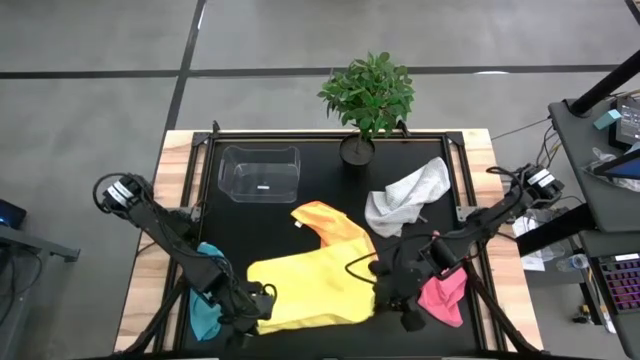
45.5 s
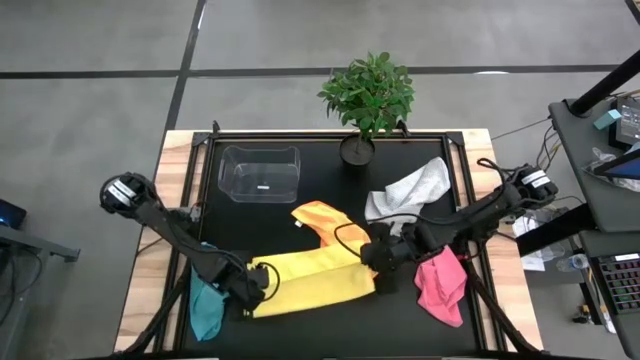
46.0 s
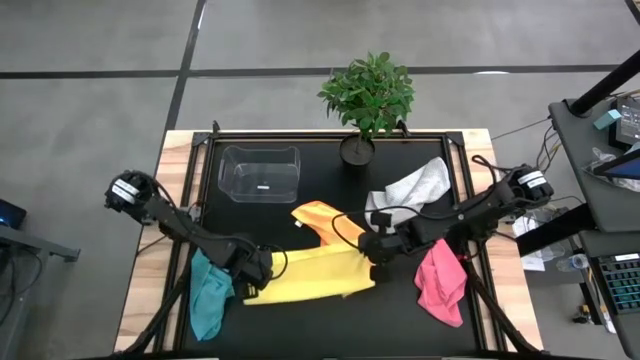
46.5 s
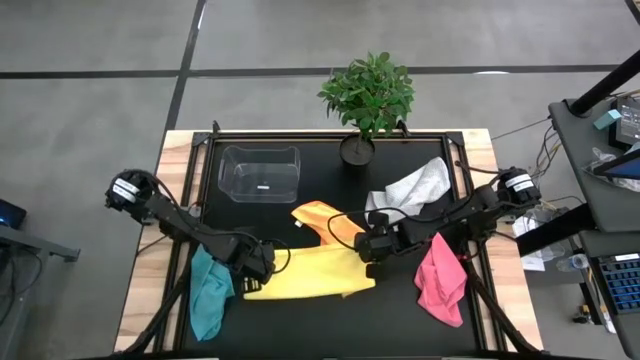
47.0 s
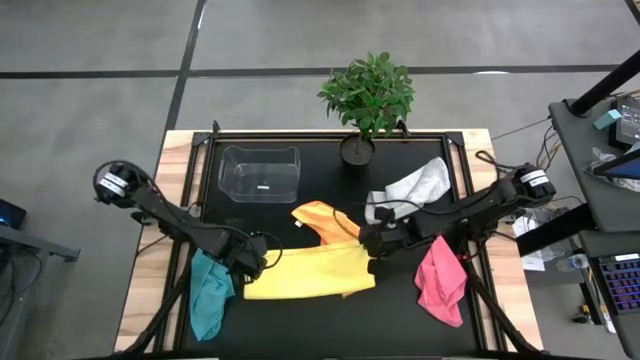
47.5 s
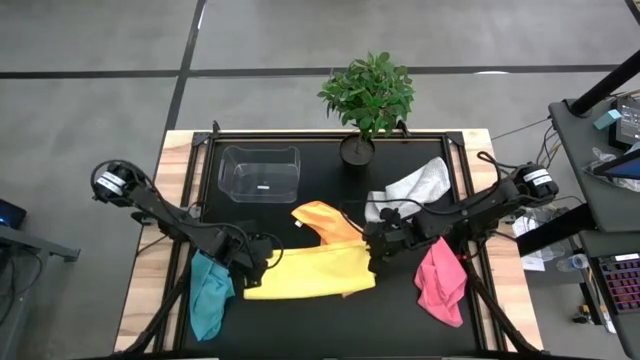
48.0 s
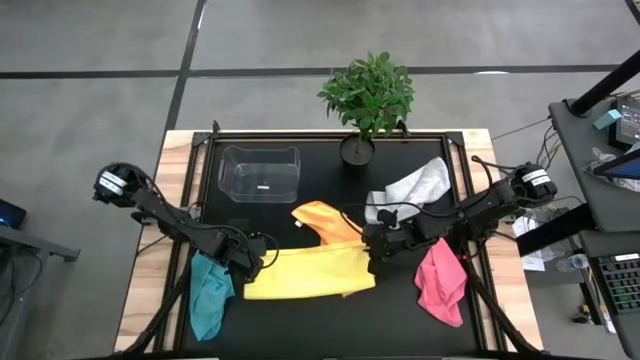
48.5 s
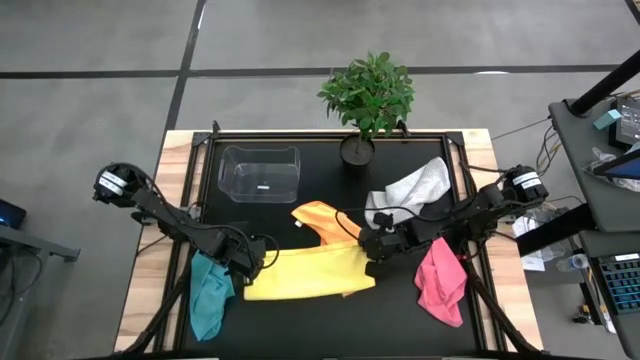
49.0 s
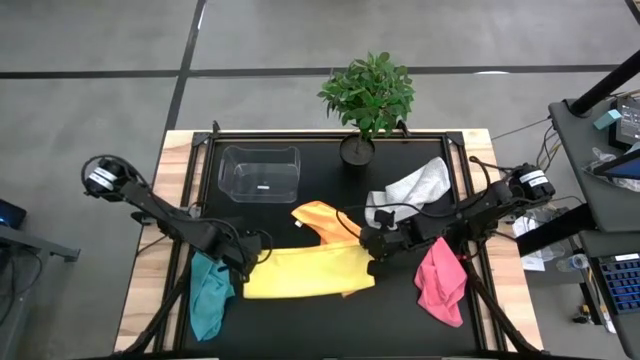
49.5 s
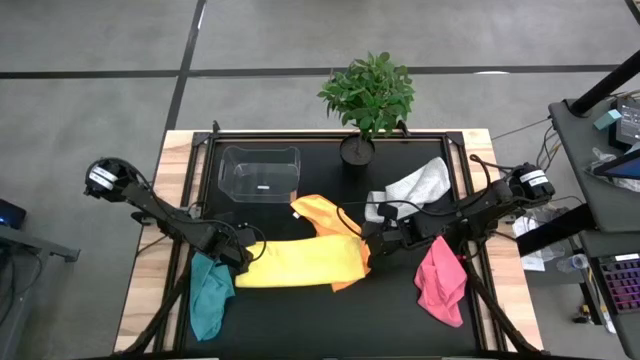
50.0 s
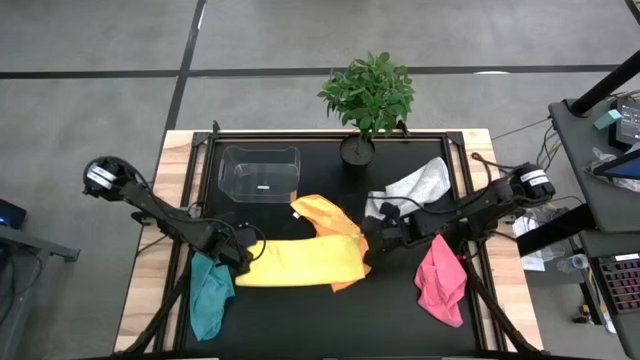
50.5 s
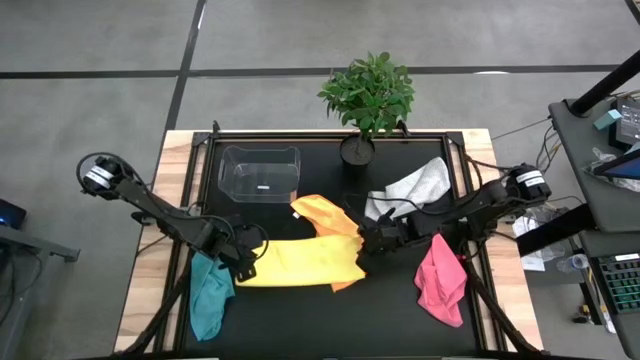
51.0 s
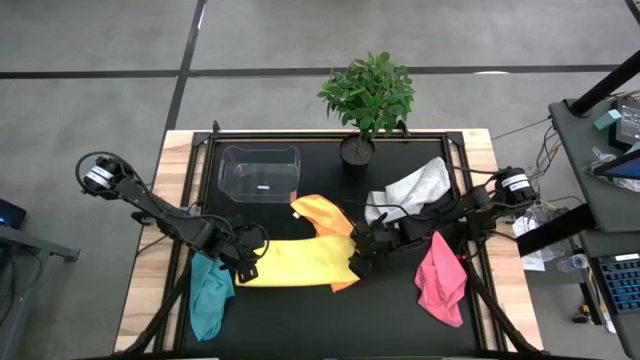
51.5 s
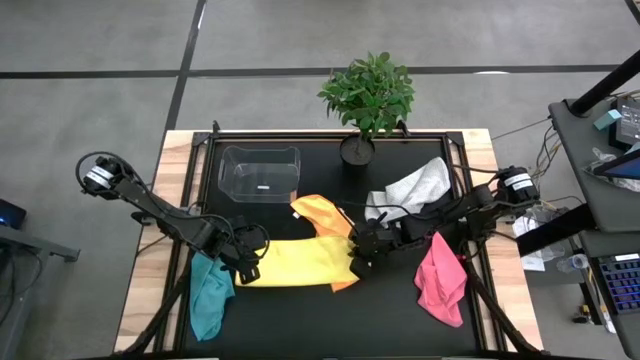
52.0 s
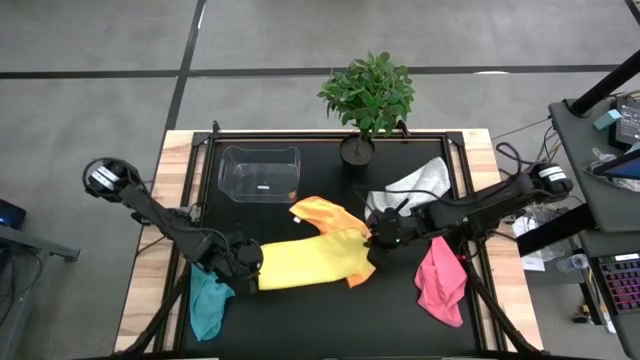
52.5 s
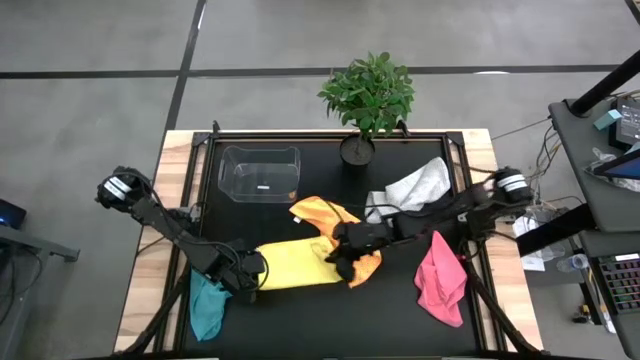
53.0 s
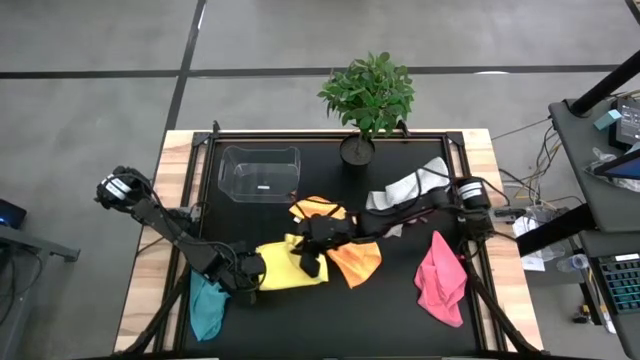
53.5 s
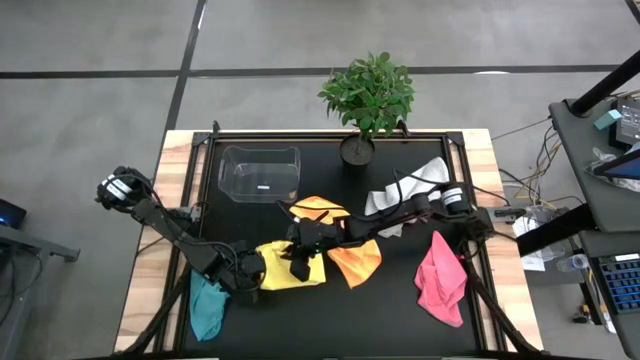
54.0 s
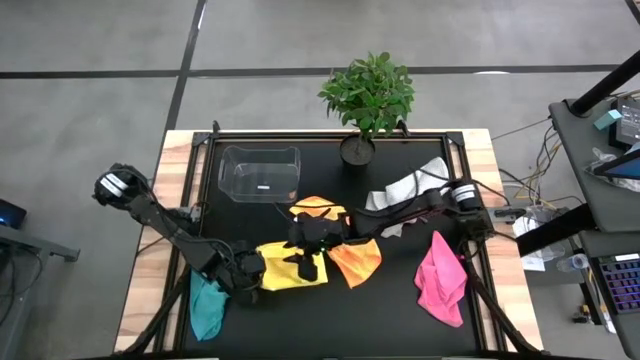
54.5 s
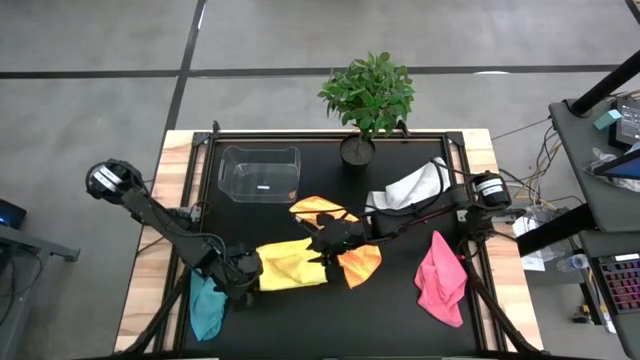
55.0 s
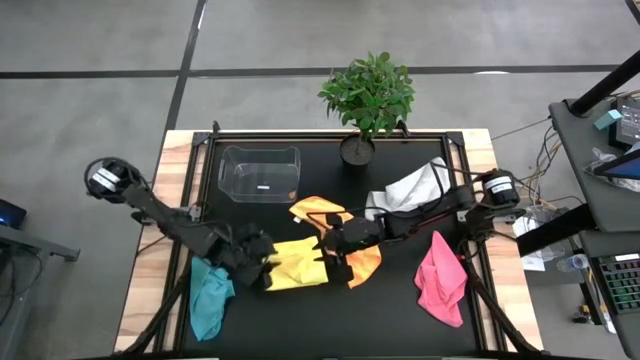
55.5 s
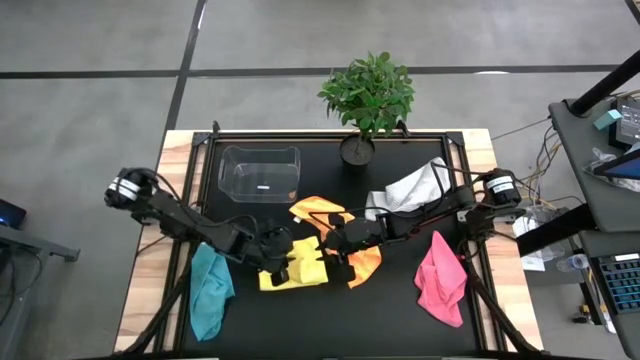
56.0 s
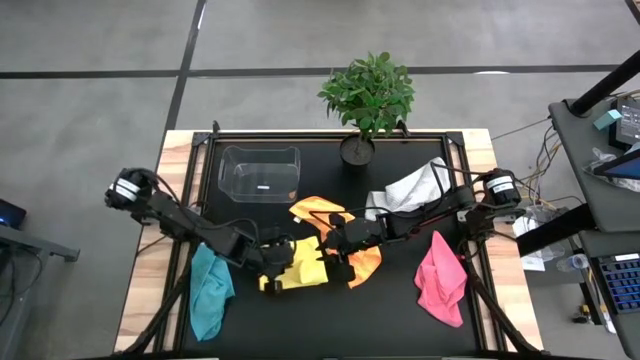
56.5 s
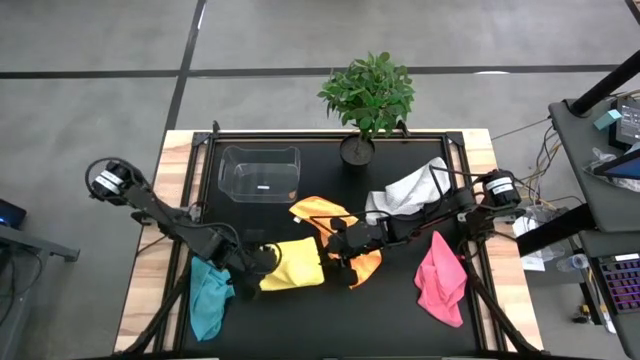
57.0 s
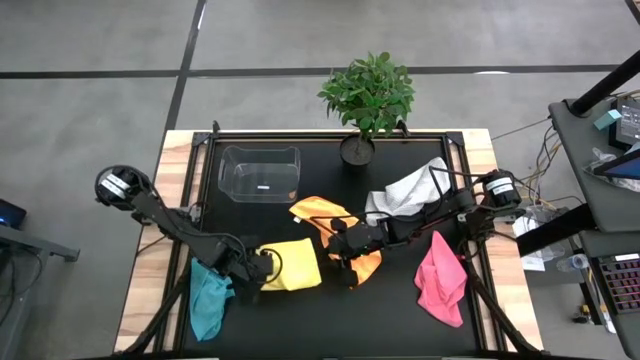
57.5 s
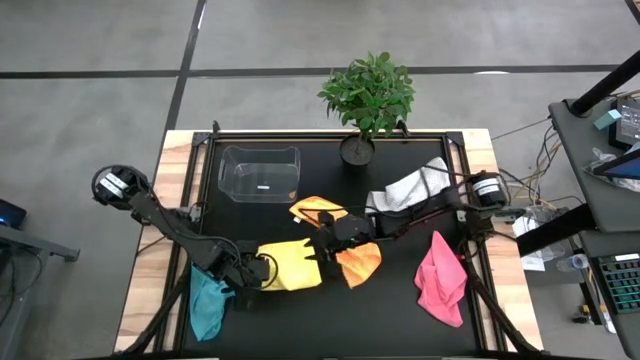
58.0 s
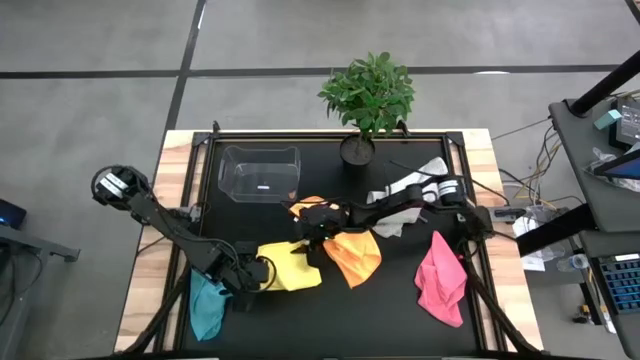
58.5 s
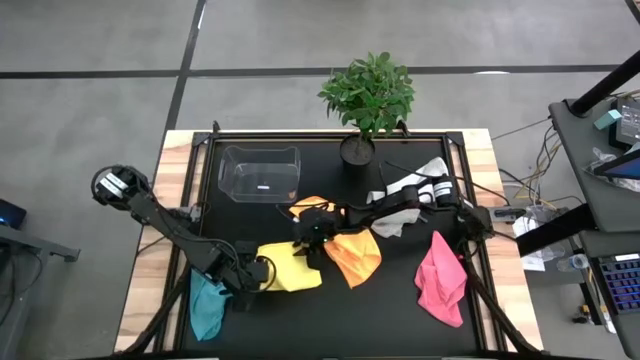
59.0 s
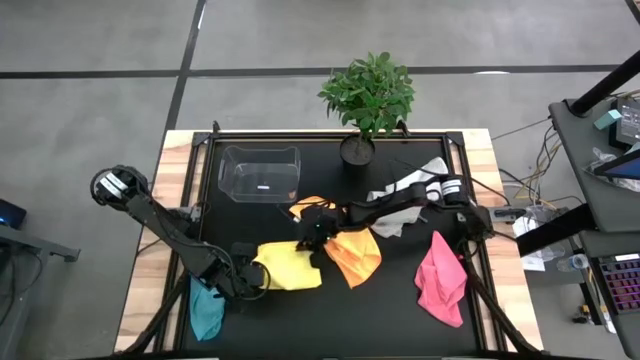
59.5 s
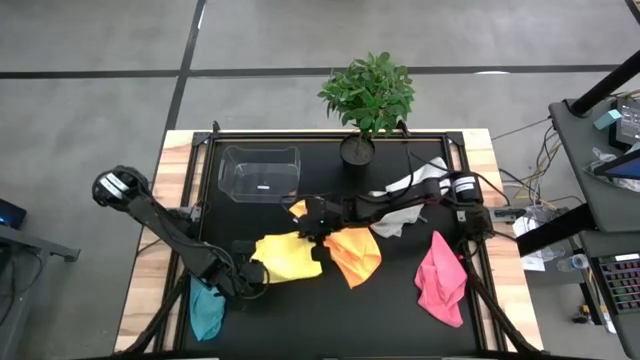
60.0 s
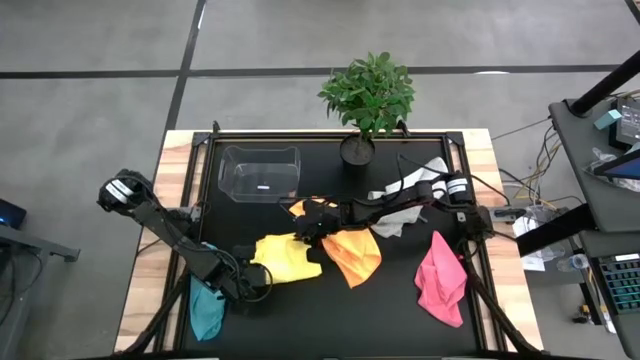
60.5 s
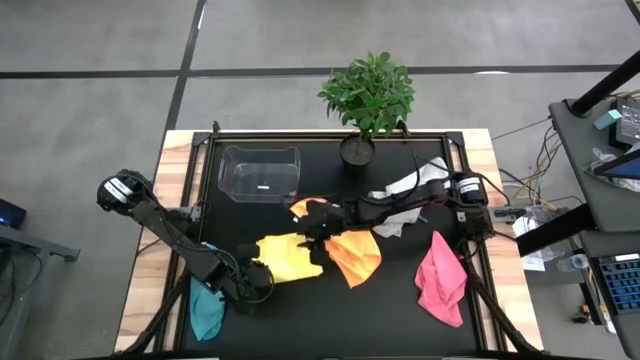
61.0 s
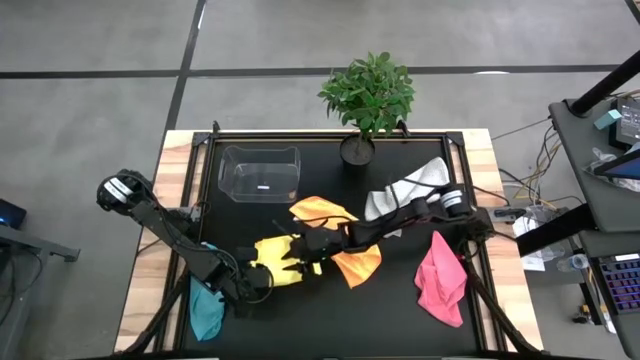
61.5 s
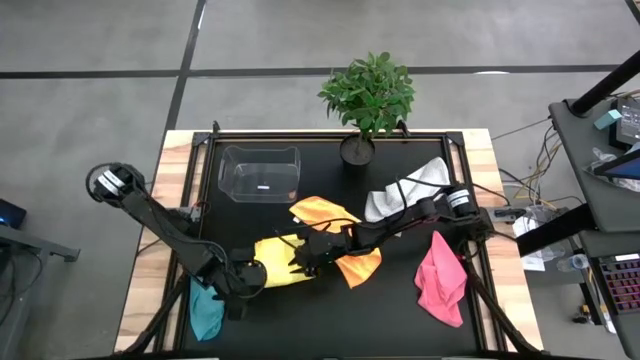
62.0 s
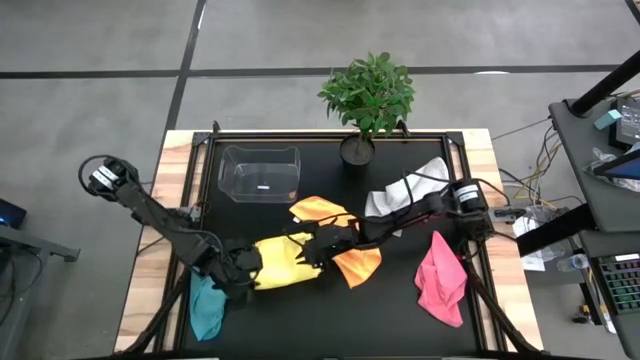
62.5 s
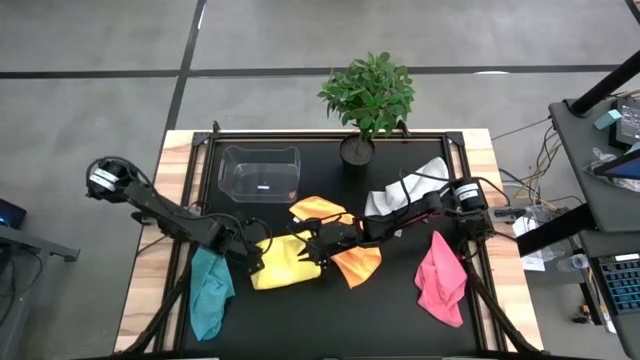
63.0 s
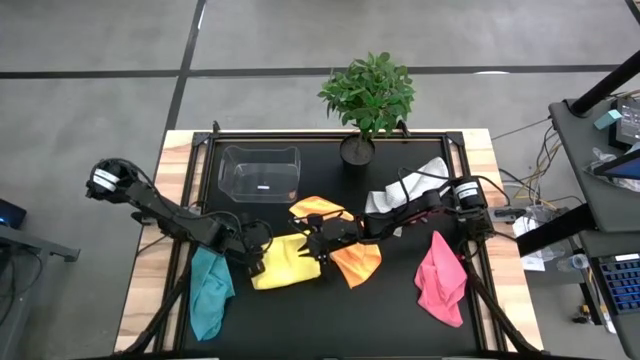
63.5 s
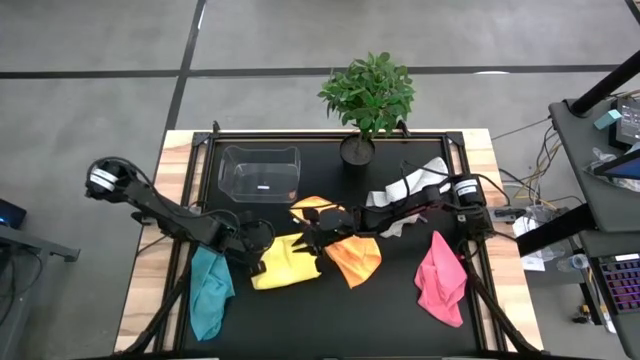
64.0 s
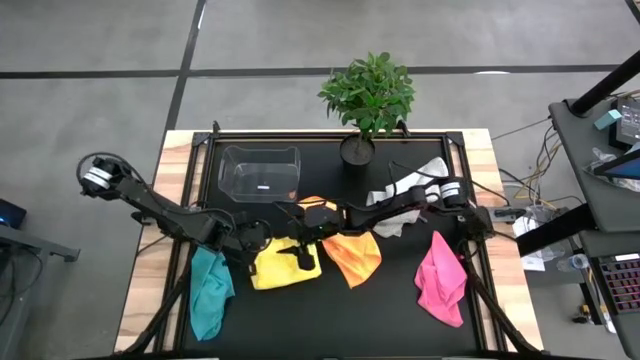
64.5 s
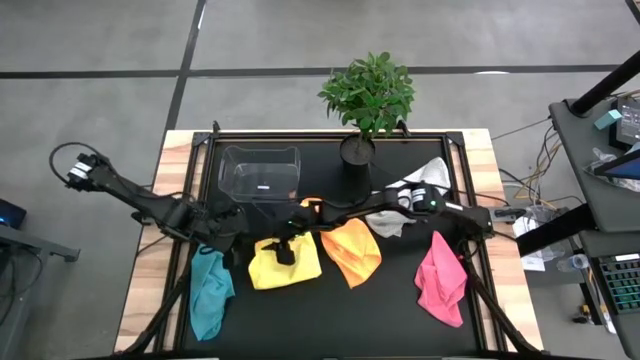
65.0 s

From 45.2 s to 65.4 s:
Task: Fold microfiber towels
Fold the yellow towel
